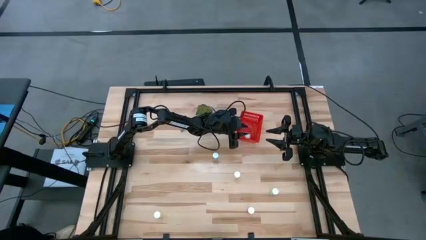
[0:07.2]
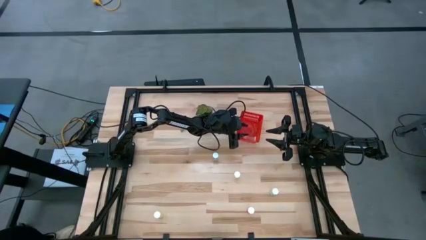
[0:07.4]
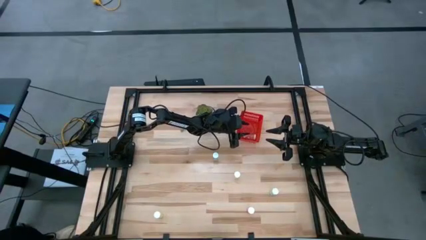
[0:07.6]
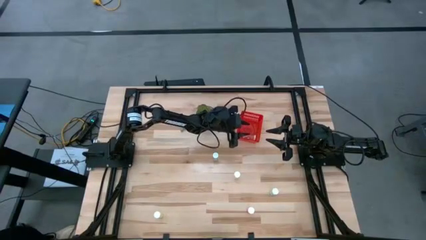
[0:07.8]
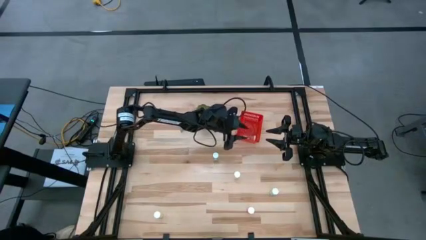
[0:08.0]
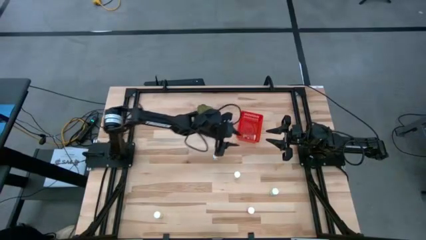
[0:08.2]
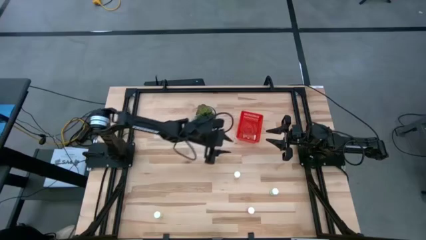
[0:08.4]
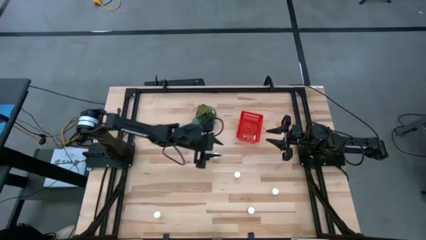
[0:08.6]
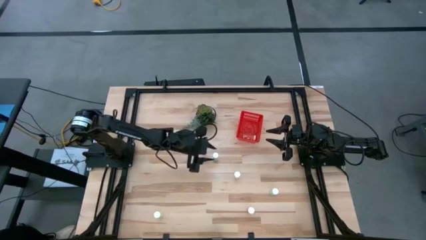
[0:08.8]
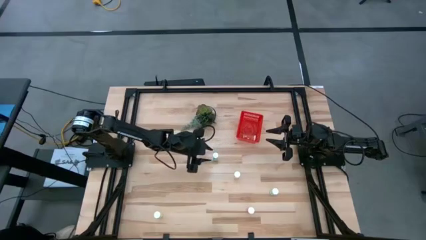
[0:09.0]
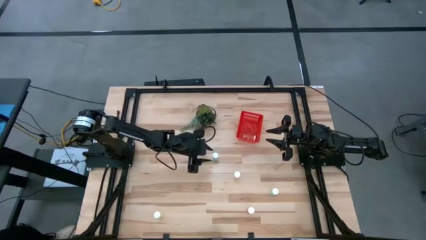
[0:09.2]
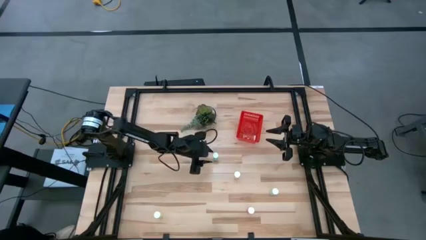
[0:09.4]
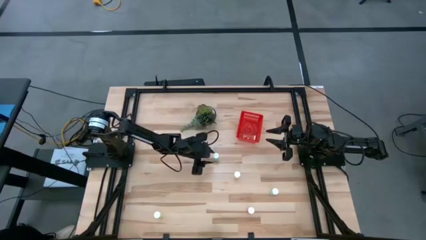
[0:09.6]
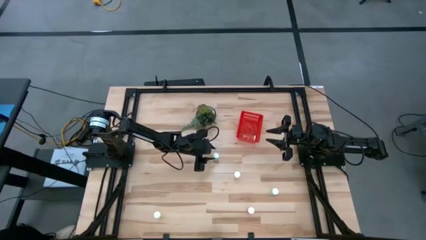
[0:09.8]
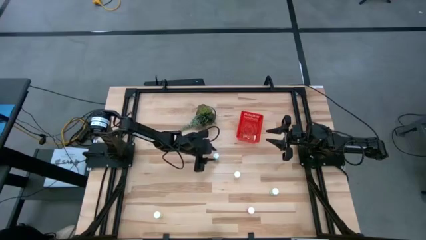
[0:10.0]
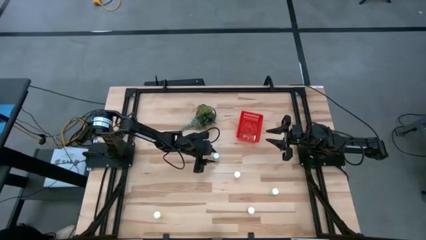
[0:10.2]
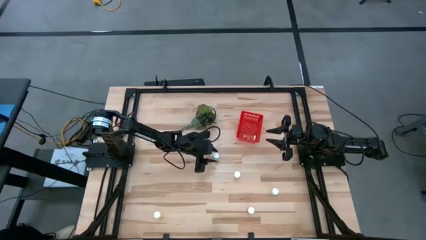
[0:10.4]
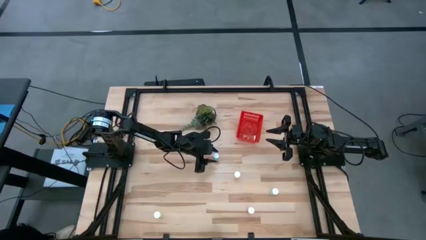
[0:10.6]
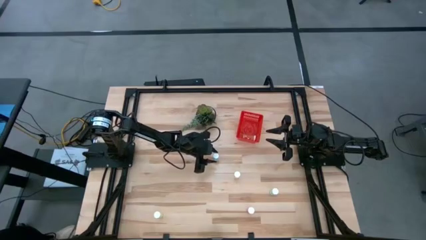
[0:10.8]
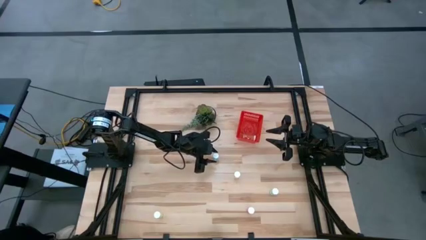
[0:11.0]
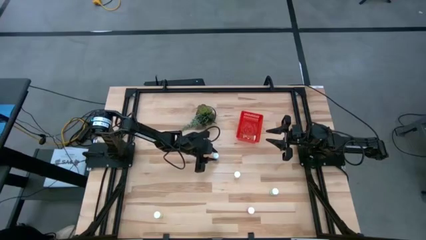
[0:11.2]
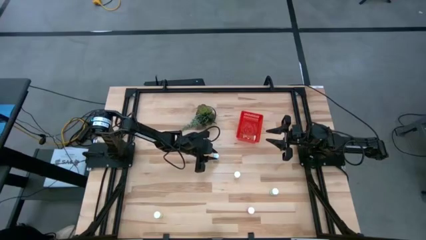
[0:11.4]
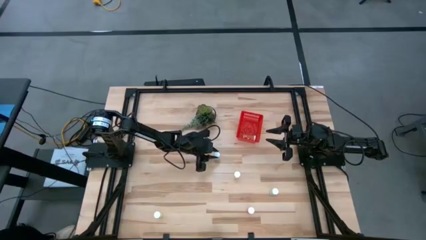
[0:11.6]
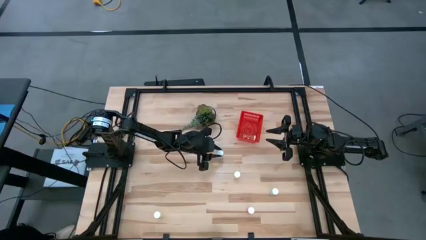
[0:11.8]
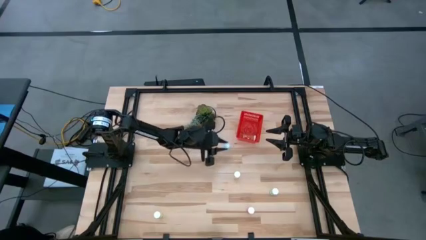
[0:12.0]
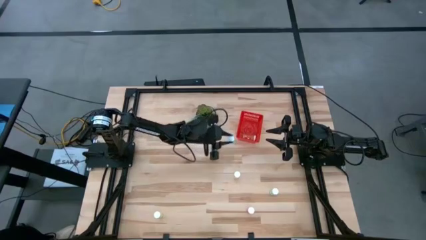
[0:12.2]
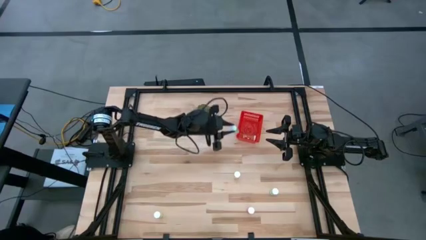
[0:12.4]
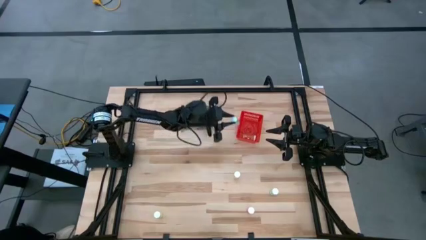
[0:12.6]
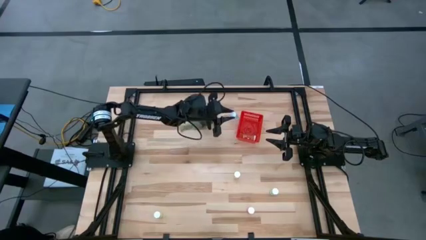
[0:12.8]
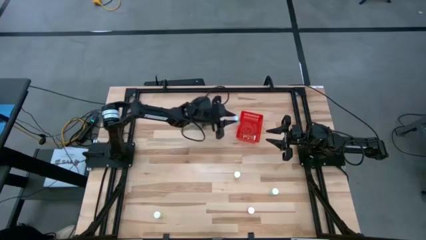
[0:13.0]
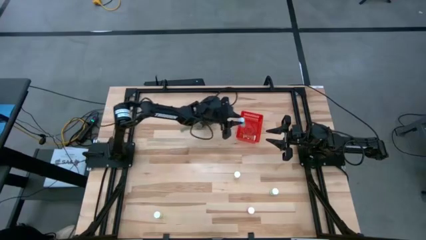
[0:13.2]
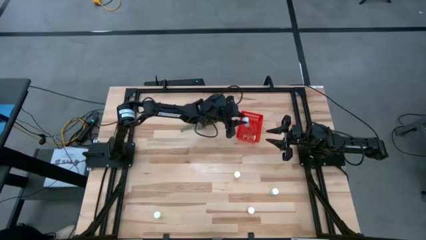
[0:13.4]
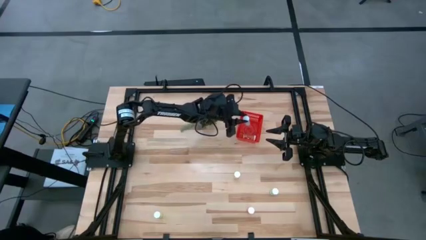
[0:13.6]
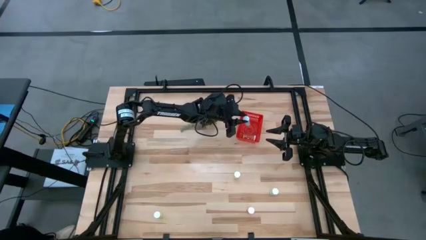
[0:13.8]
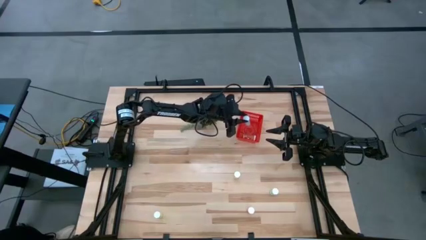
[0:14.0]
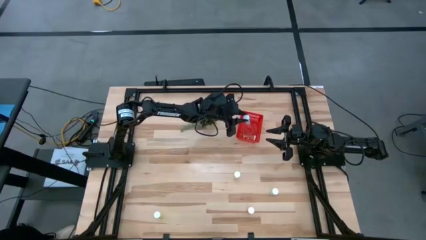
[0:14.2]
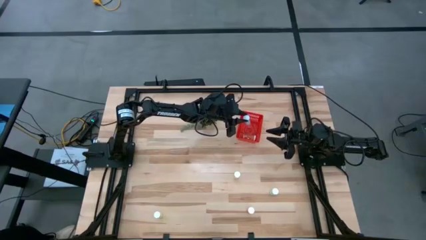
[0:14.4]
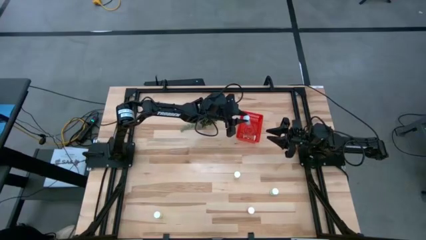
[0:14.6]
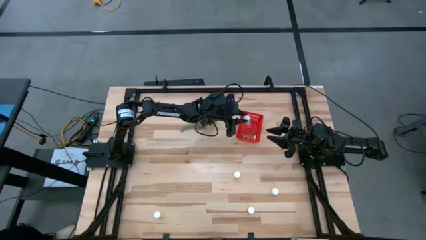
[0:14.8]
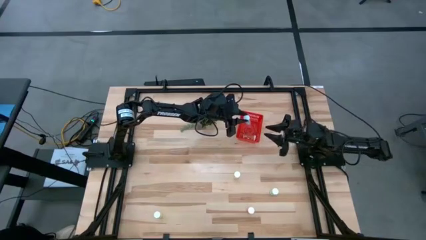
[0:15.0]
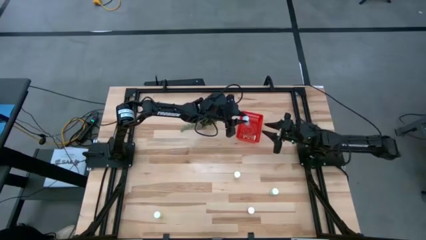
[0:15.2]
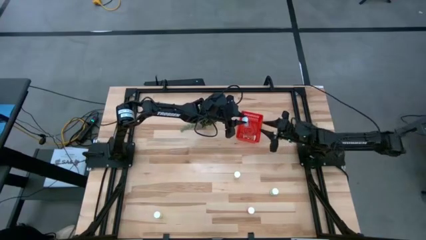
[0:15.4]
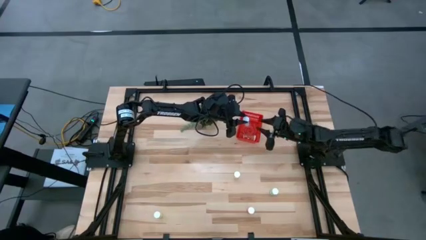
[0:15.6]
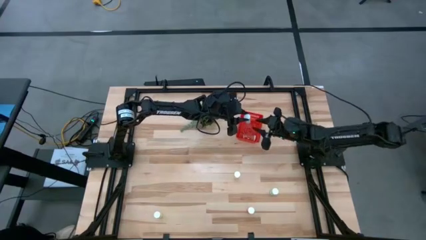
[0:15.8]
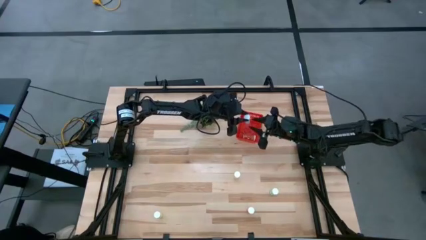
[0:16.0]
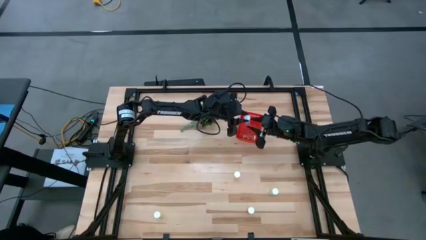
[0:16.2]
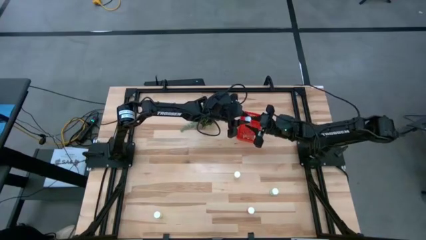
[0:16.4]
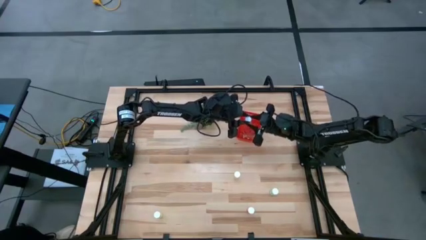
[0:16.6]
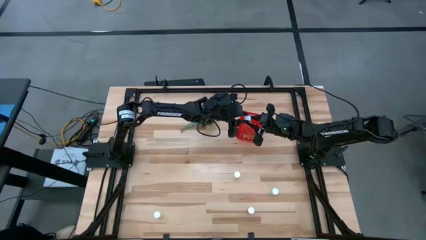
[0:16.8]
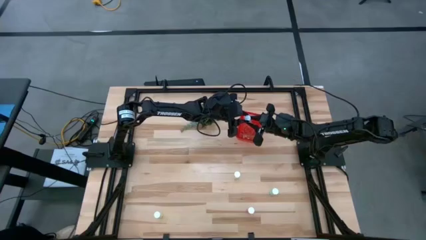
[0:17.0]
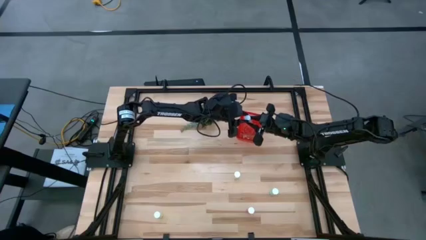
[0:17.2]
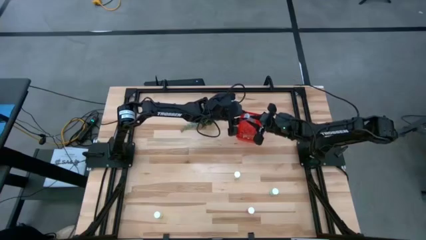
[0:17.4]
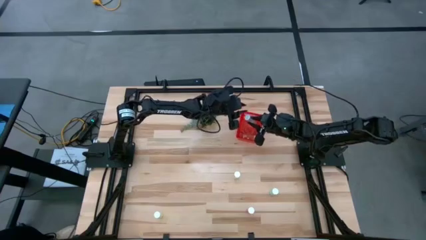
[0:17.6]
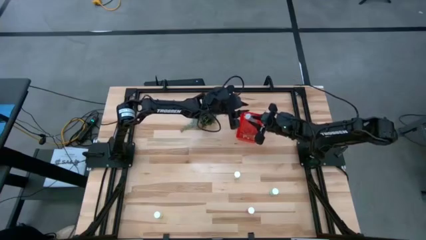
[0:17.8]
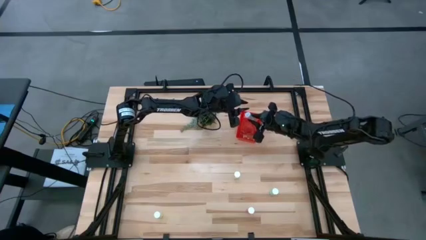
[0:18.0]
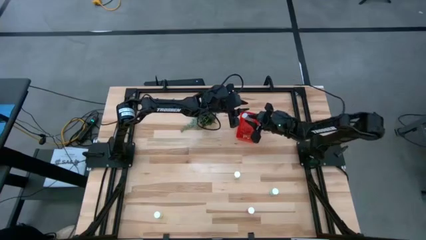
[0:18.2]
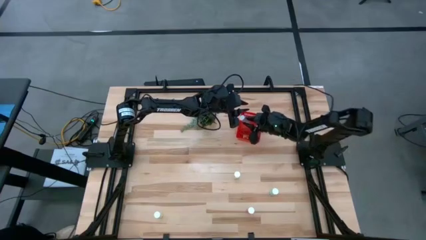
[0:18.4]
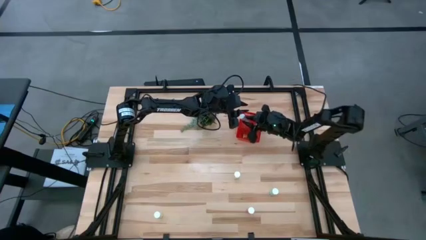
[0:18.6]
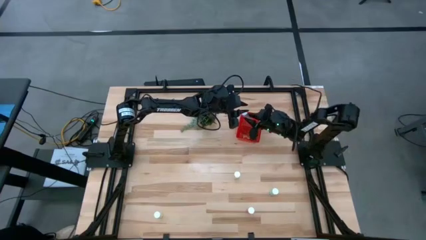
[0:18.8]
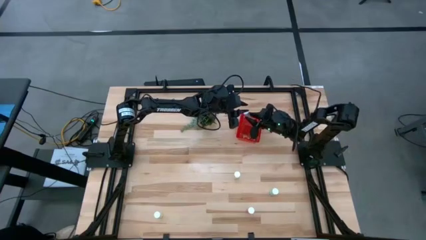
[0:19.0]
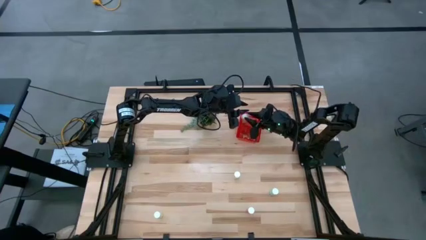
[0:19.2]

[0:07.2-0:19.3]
Task: Pick and place pill bottles into a basket
Put the top blue pill bottle into the red basket

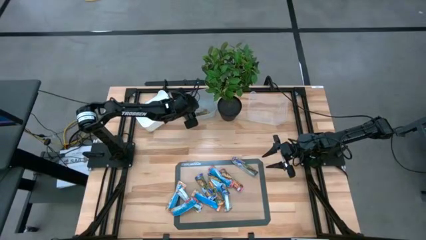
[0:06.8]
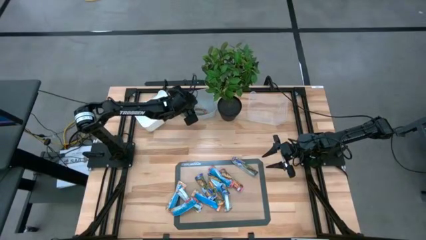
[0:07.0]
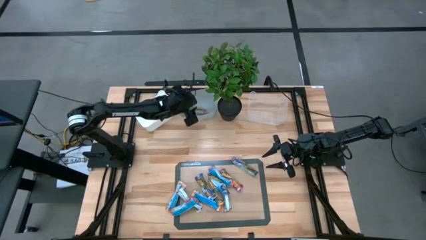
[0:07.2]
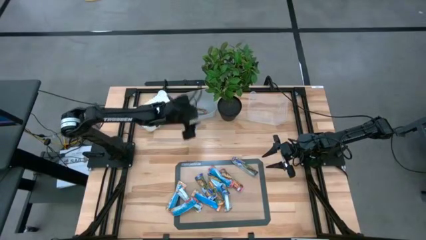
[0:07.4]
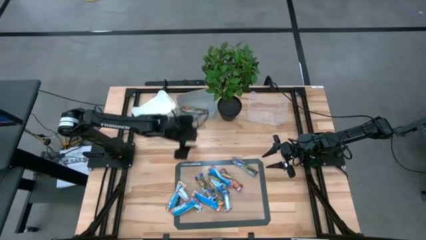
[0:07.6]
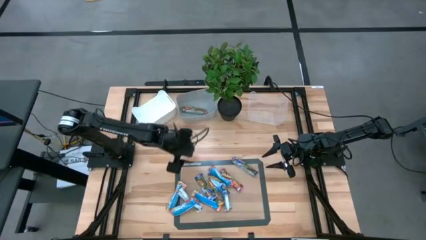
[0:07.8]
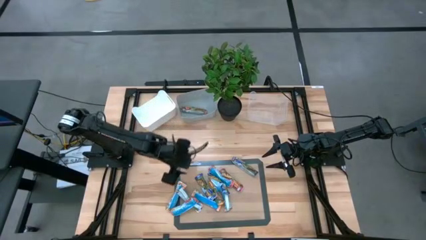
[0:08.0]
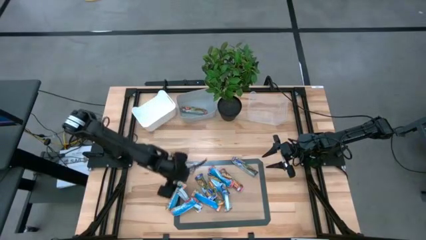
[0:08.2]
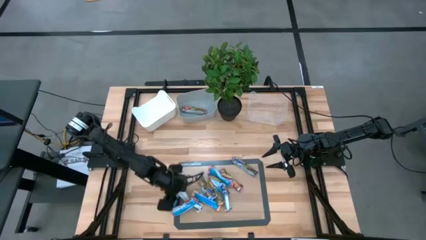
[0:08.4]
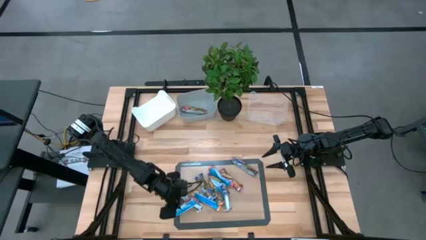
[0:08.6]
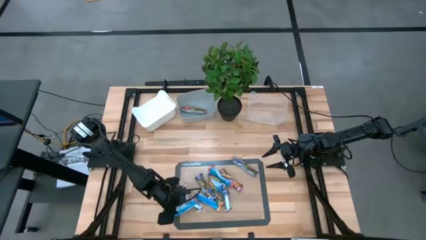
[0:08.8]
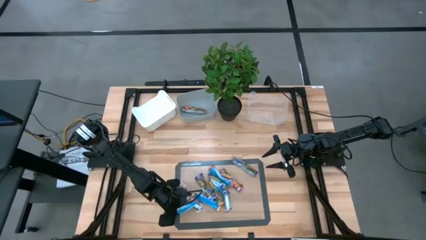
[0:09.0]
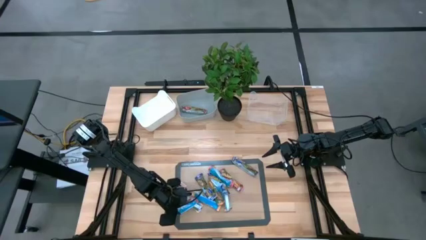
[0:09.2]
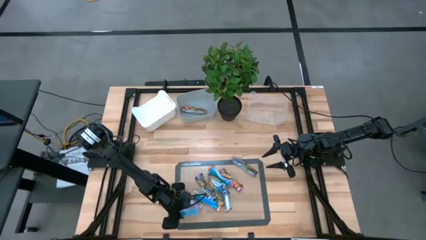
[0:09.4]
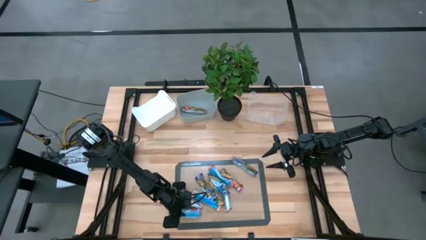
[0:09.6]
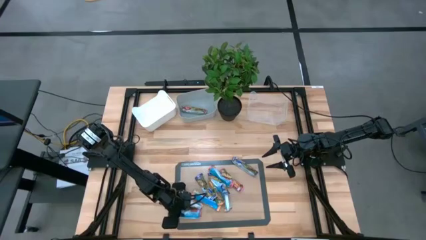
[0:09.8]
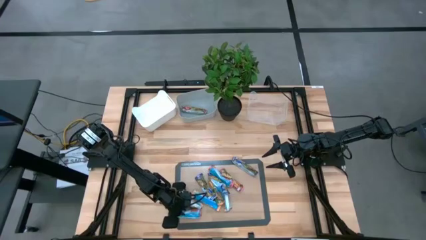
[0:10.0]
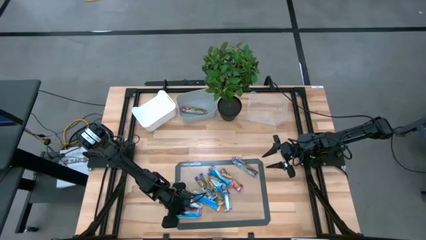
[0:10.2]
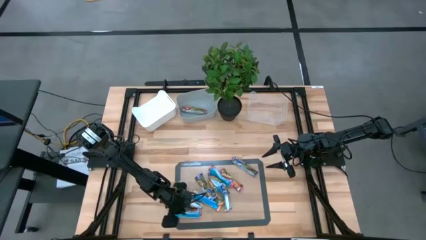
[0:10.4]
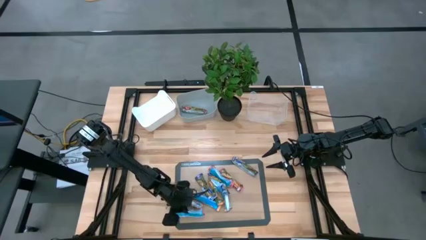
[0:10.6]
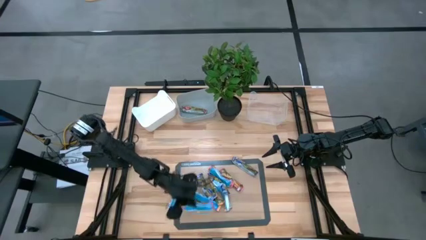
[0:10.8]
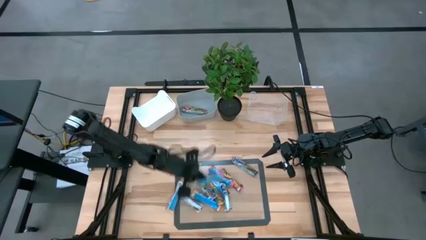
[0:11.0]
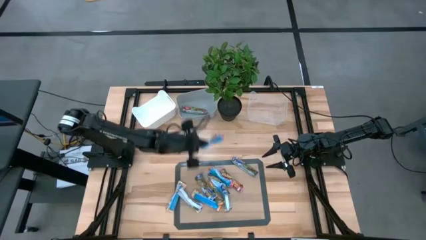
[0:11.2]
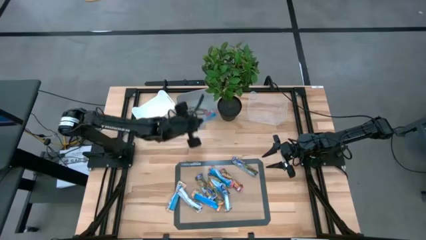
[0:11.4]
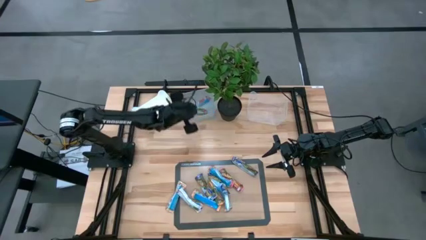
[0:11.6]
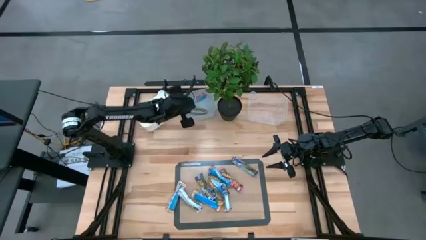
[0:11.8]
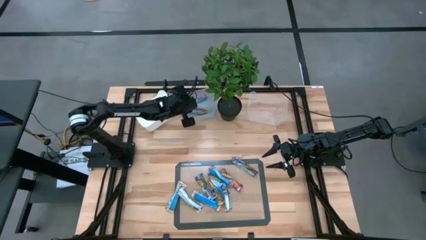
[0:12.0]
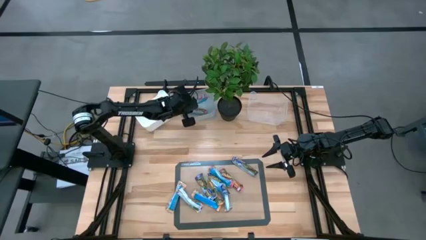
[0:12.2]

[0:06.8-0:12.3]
Task: Pick and place Granola Bars by type
Put the red granola bar into the gray bin
